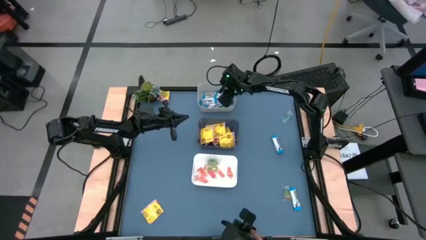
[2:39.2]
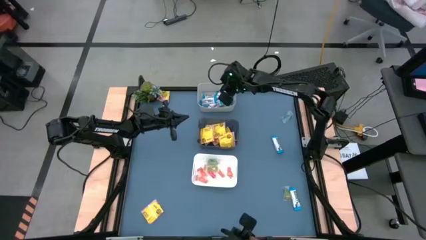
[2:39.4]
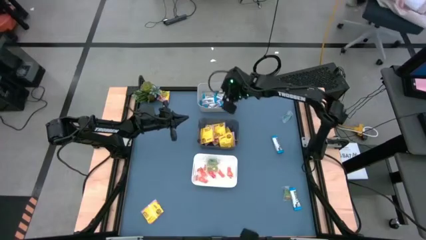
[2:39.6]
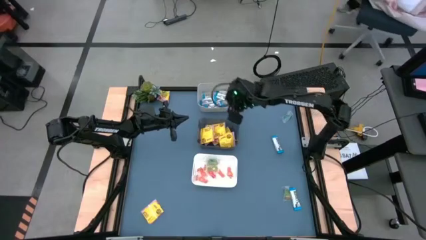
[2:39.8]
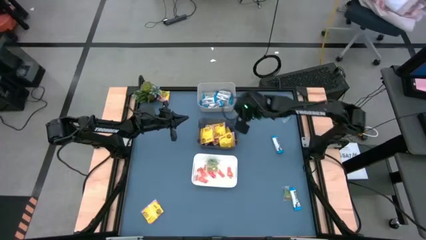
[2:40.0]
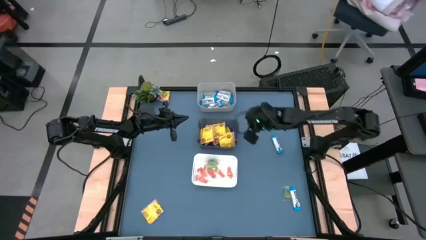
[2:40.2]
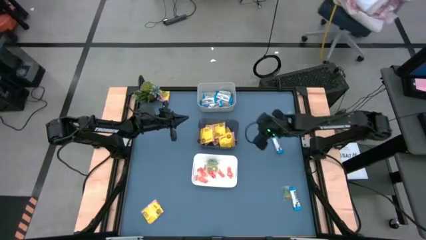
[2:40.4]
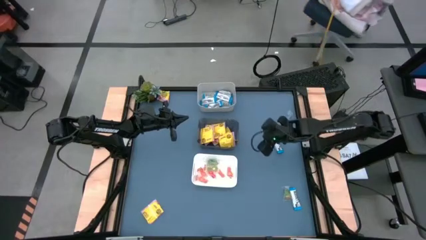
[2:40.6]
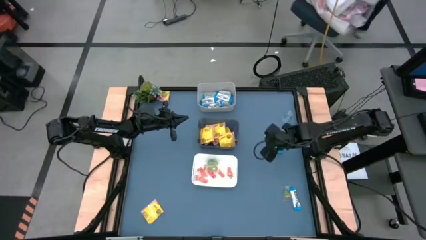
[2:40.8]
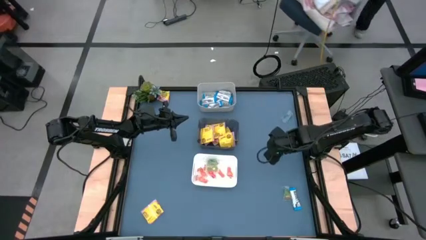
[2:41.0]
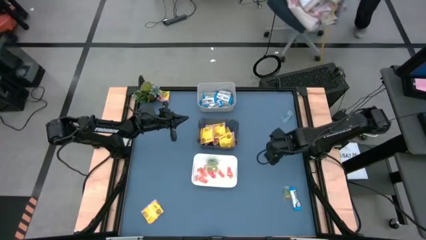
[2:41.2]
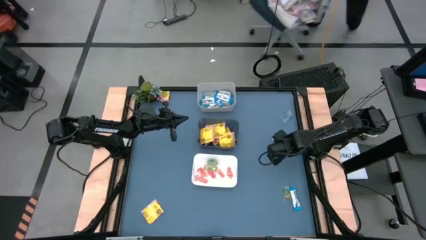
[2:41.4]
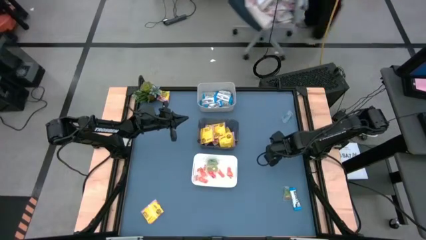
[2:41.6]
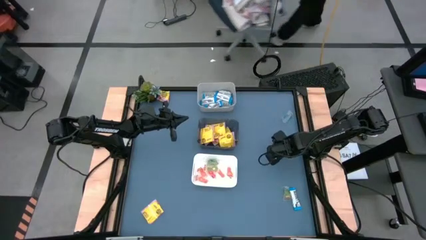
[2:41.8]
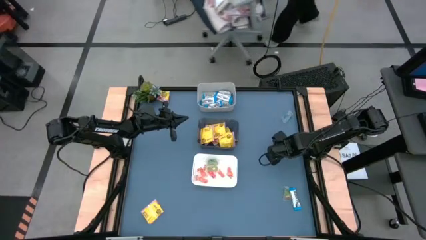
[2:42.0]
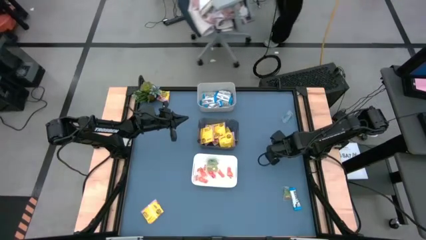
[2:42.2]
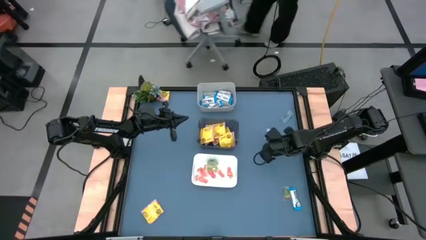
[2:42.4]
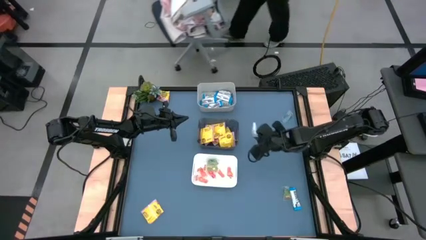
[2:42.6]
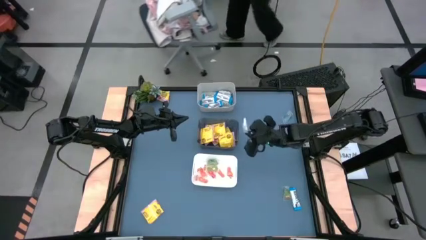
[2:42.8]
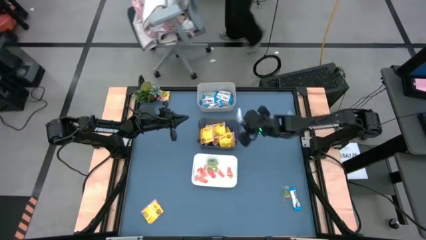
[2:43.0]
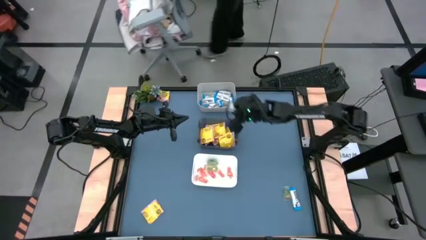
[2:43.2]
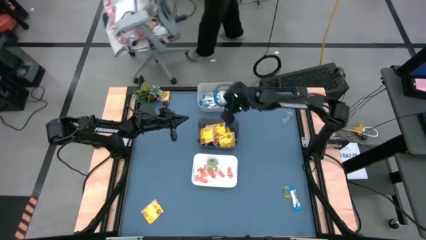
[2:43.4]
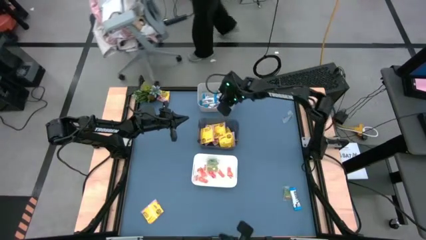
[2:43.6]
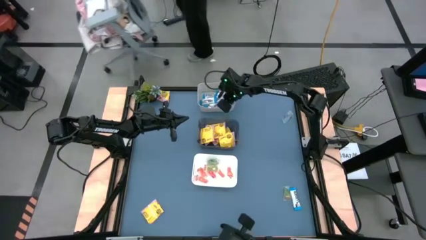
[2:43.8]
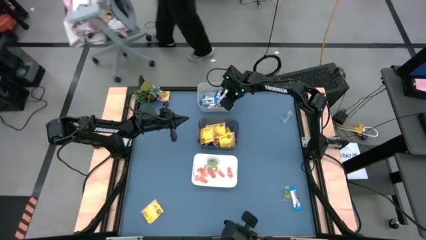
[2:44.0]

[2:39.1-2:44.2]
Task: Sort candy
Put the white chocolate bar into the gray bin

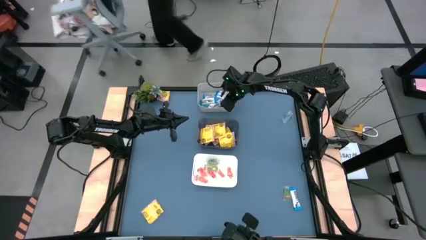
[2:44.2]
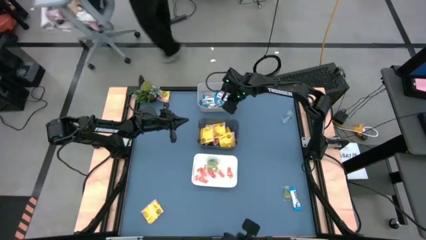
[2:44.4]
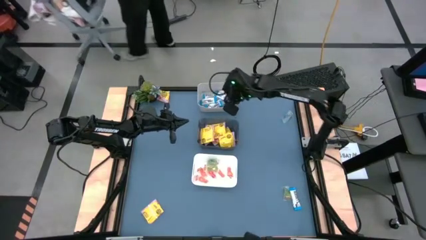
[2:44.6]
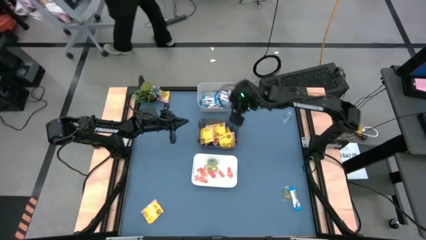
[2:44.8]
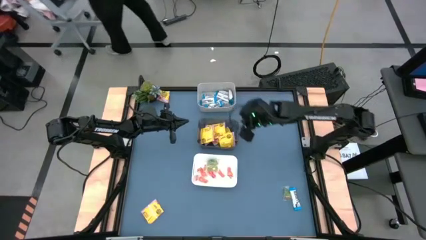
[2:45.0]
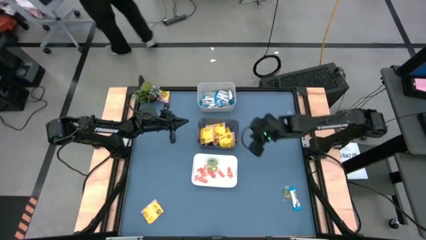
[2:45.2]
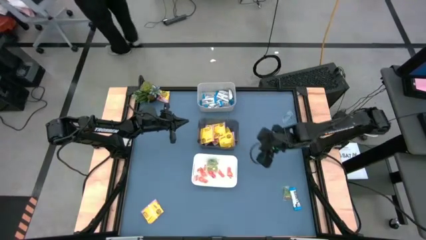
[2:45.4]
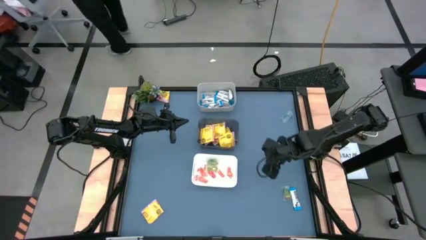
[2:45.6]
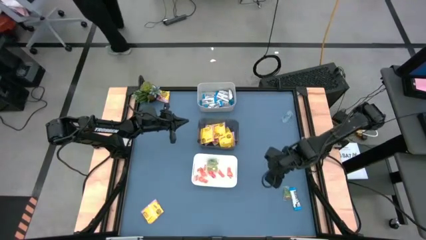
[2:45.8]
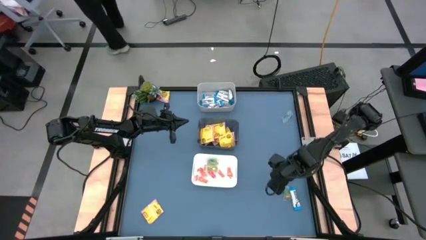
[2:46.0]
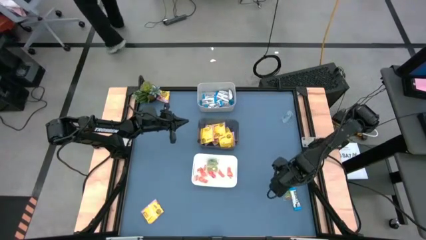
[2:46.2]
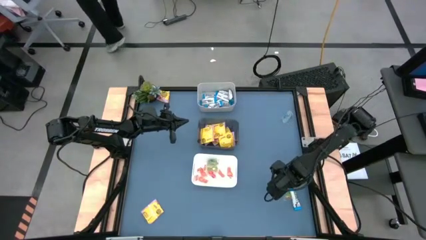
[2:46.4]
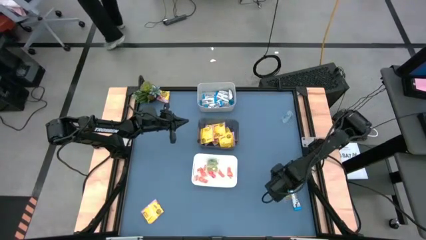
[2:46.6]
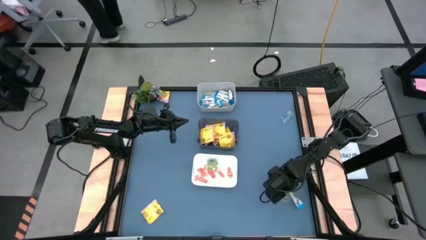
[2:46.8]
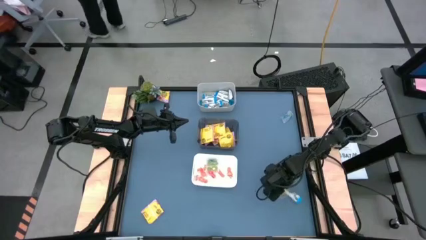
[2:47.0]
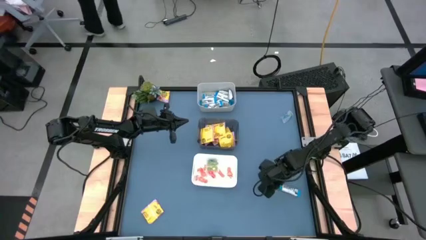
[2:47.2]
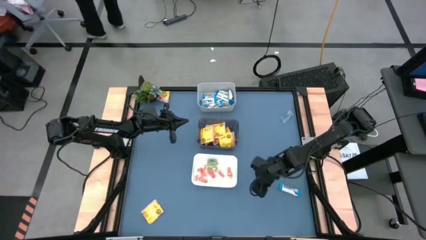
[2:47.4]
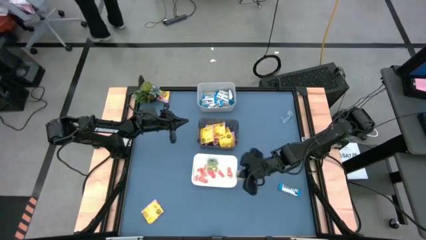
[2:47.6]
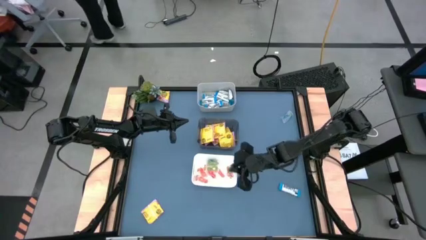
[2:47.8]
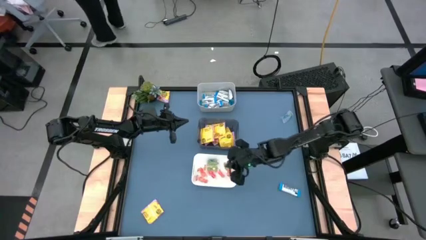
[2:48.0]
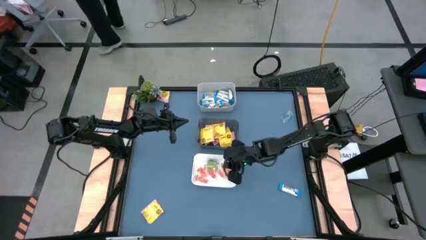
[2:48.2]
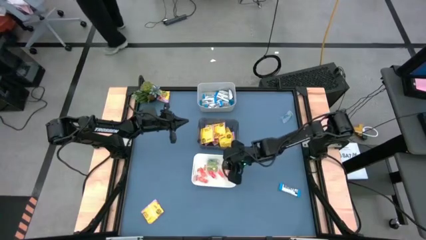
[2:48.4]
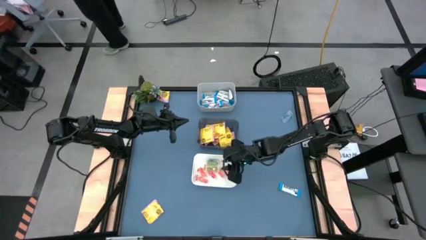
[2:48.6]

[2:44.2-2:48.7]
Put the green gummy candy into the white bin

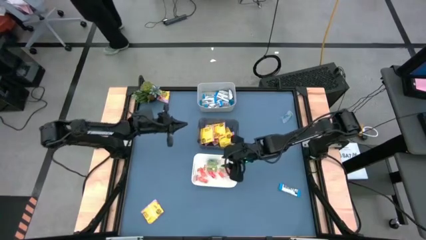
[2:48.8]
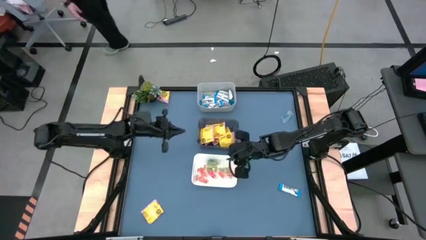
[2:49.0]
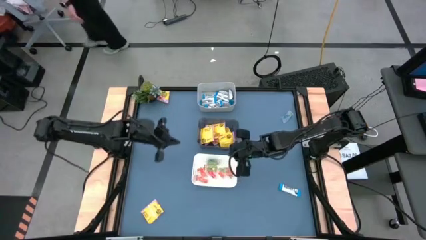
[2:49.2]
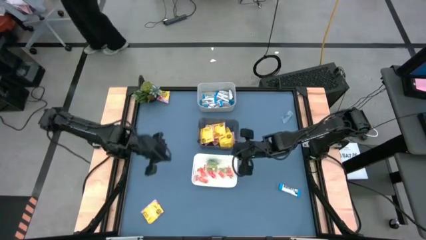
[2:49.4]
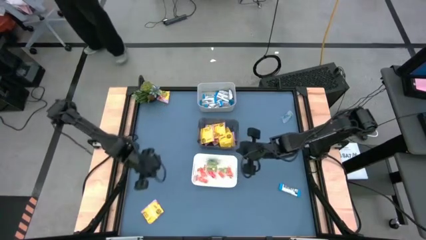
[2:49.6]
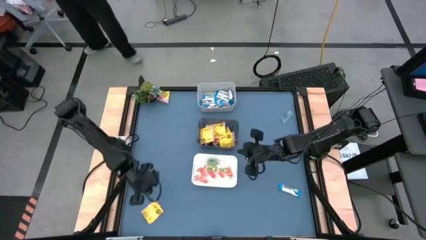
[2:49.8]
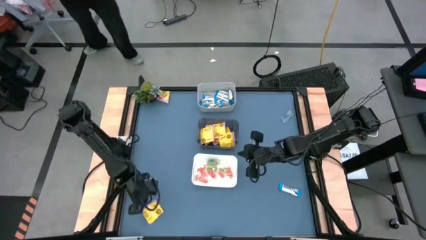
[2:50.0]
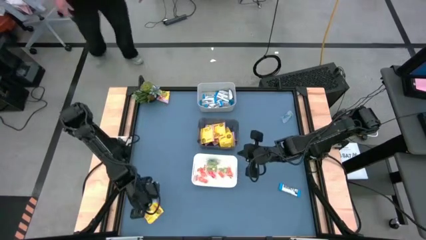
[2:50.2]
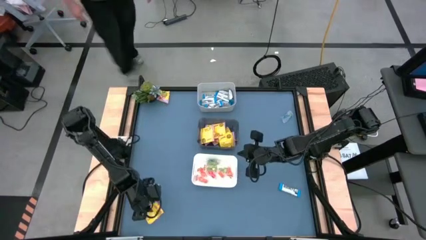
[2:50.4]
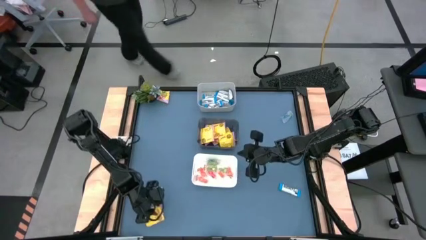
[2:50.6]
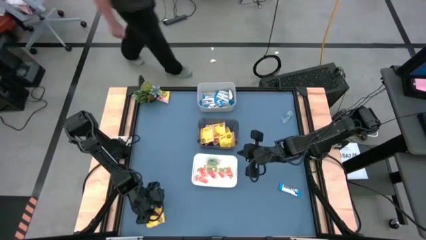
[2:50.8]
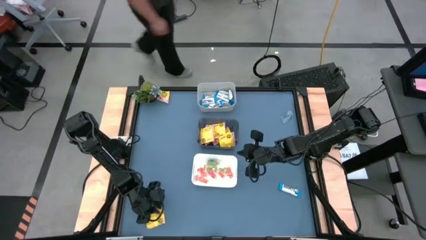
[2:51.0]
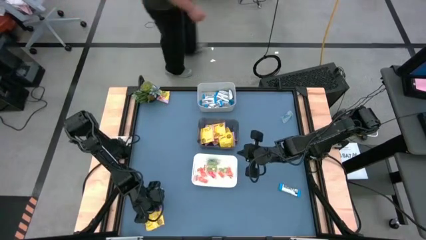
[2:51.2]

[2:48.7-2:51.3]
Put the yellow candy into the black bin

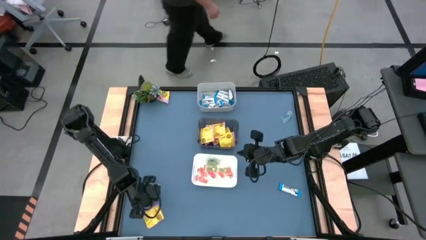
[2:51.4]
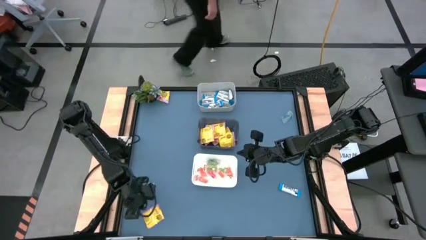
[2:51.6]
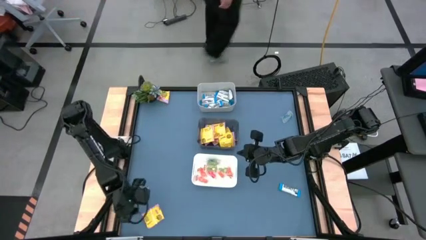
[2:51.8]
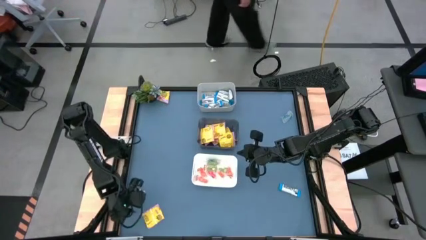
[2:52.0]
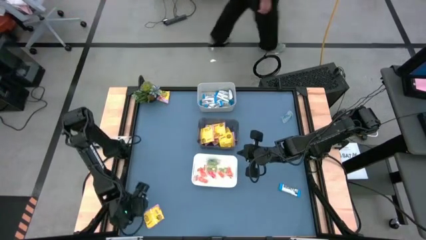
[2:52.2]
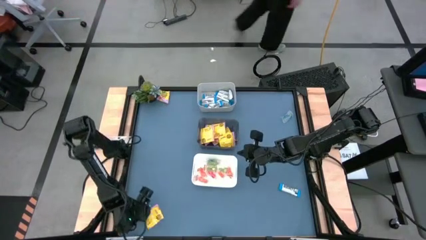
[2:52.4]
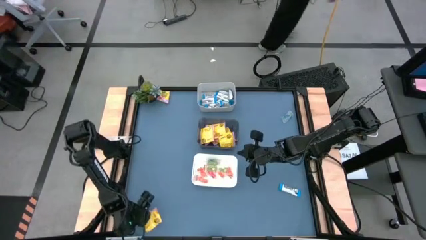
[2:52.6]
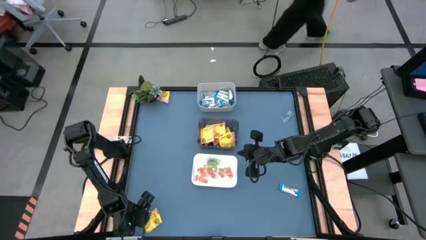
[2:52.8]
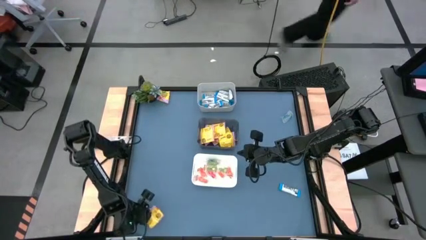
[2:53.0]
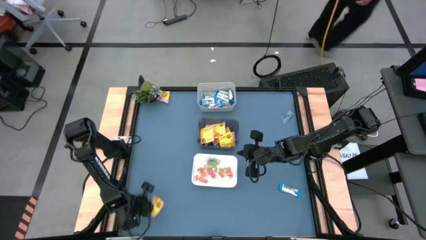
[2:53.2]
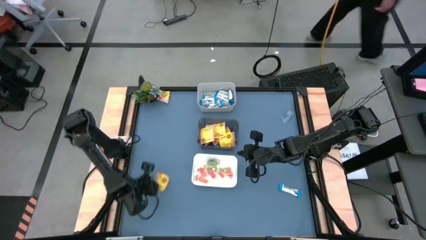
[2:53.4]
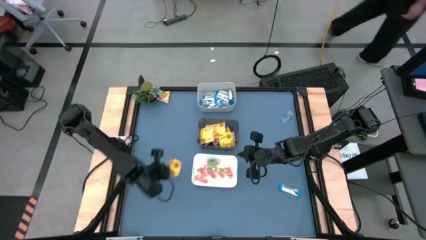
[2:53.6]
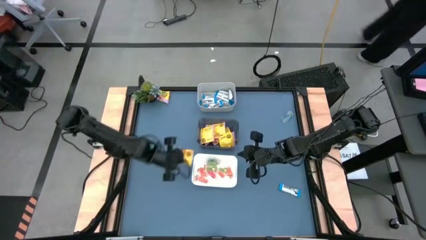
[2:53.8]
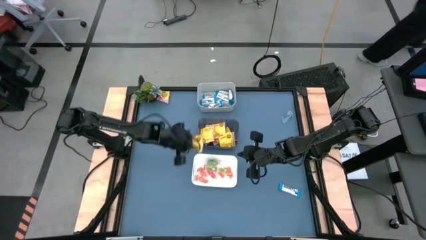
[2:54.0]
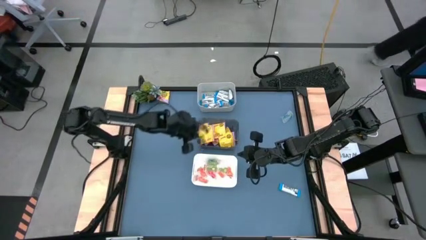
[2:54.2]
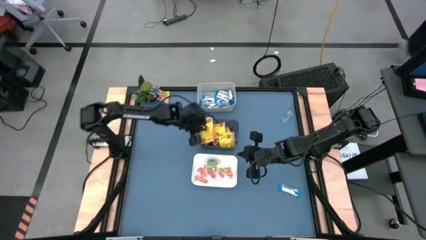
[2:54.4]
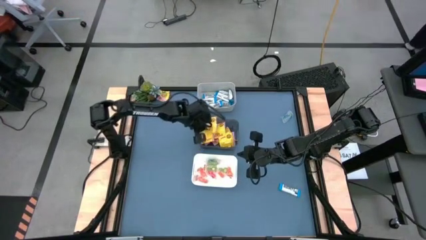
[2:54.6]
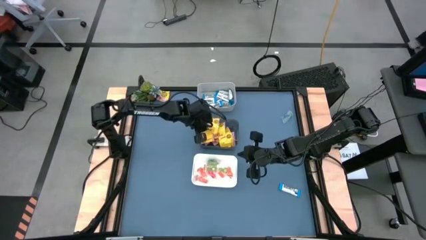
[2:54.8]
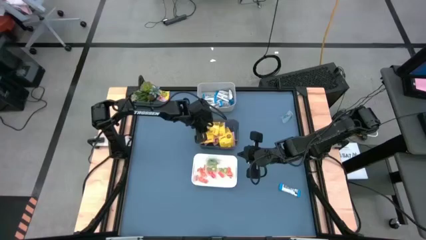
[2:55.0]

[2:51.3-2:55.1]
Put the yellow candy into the black bin
